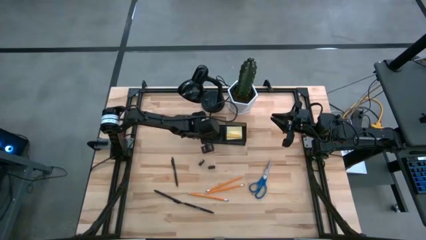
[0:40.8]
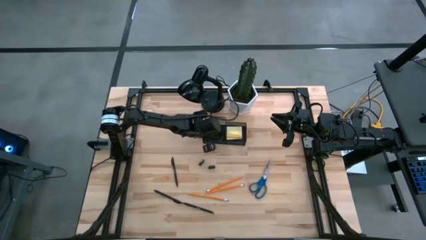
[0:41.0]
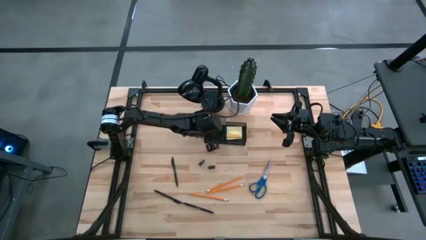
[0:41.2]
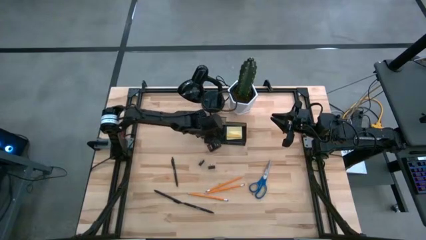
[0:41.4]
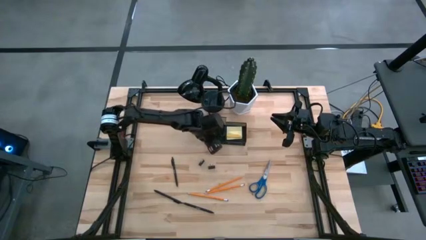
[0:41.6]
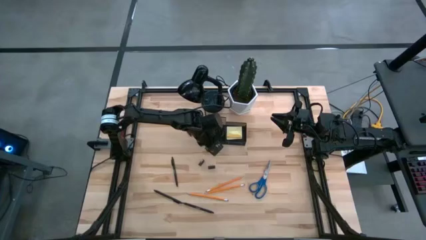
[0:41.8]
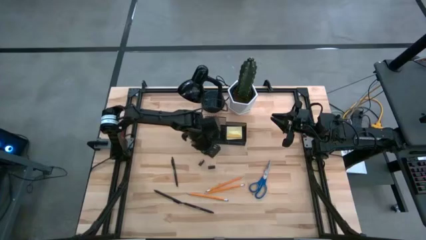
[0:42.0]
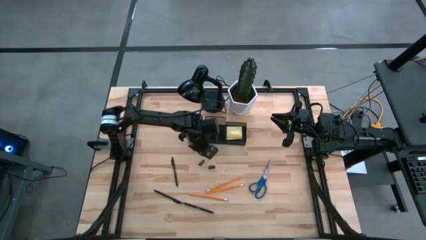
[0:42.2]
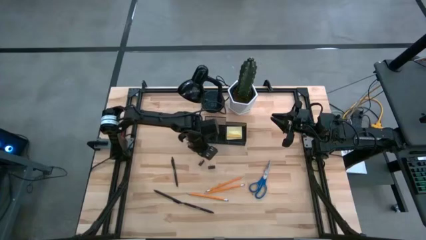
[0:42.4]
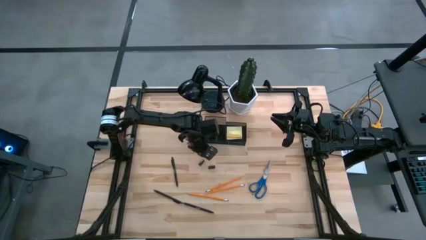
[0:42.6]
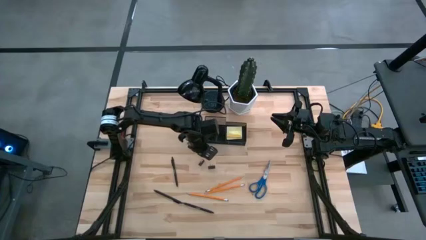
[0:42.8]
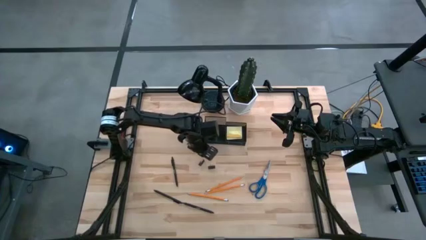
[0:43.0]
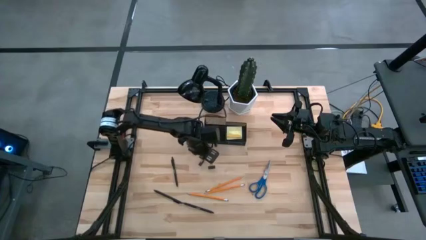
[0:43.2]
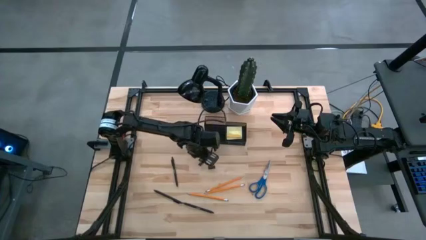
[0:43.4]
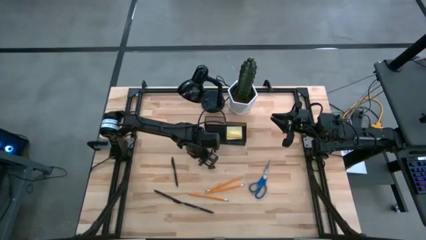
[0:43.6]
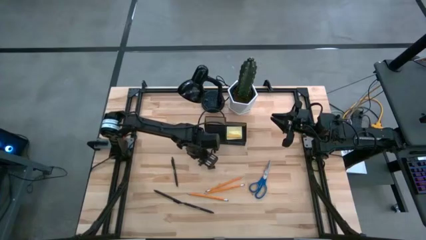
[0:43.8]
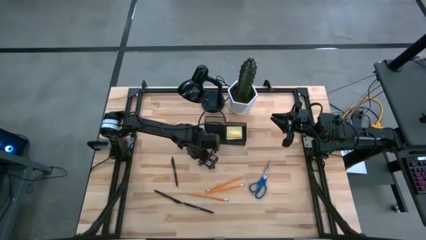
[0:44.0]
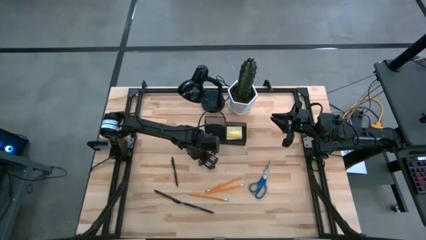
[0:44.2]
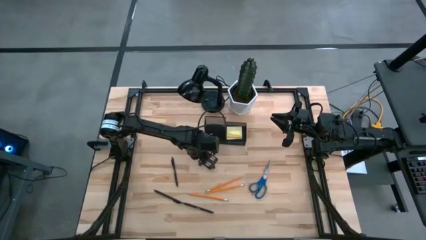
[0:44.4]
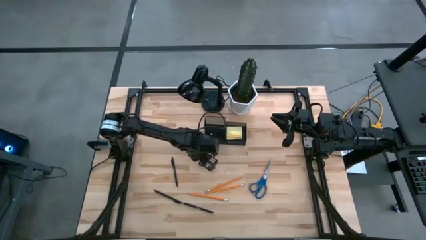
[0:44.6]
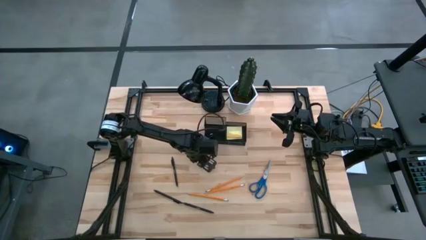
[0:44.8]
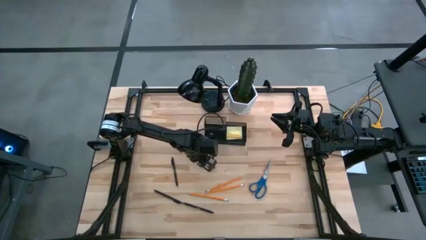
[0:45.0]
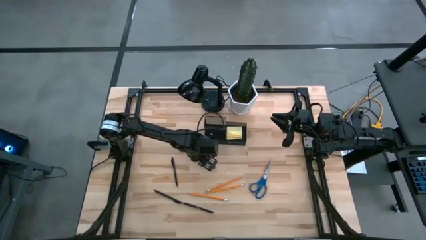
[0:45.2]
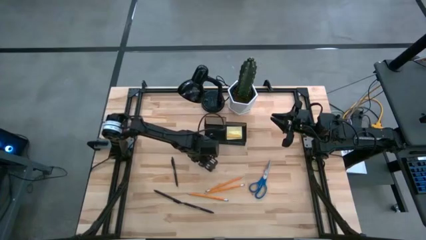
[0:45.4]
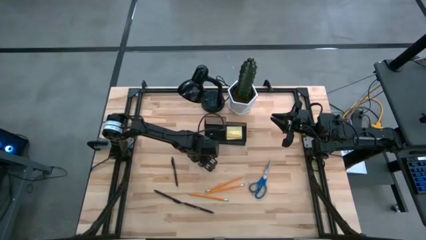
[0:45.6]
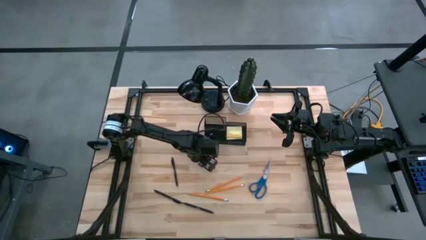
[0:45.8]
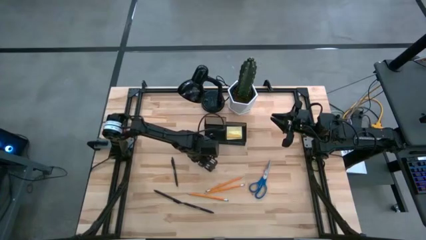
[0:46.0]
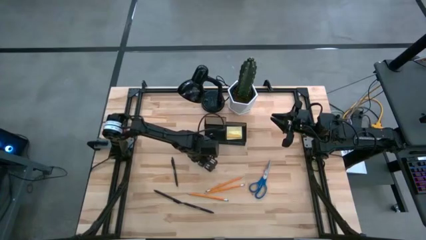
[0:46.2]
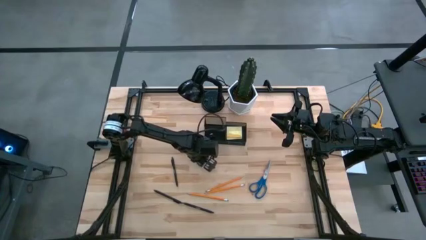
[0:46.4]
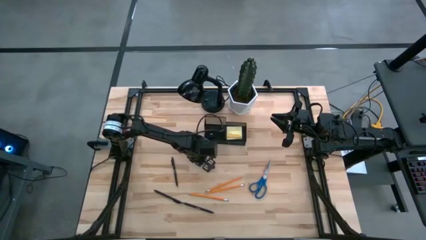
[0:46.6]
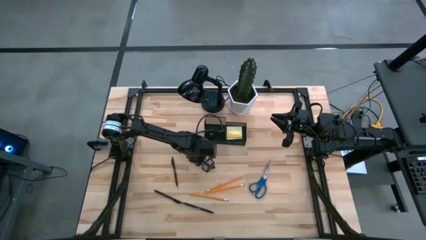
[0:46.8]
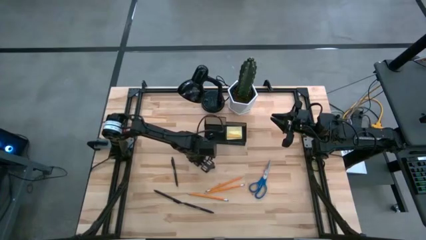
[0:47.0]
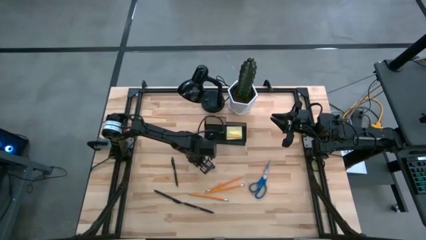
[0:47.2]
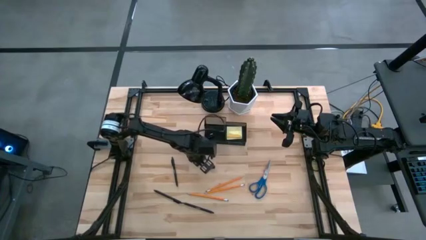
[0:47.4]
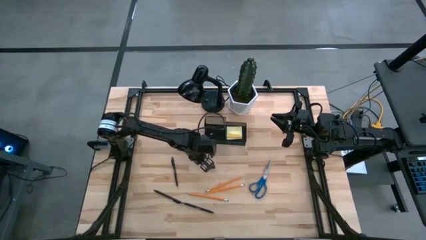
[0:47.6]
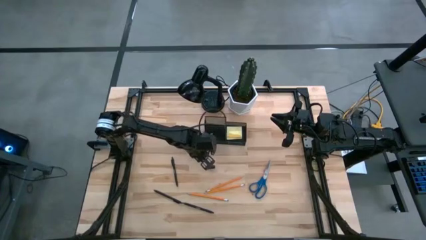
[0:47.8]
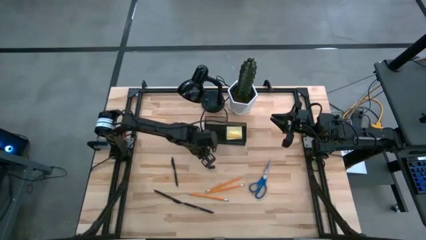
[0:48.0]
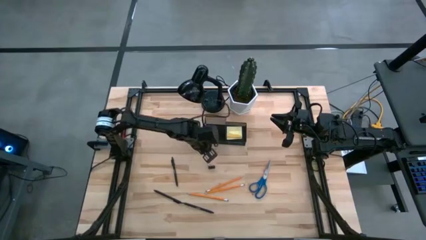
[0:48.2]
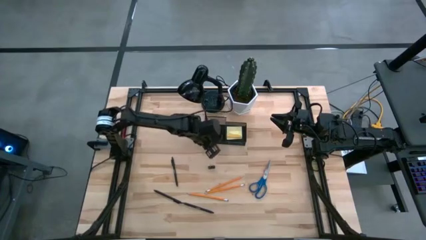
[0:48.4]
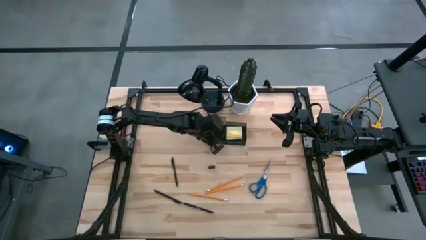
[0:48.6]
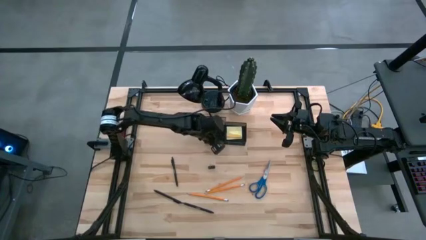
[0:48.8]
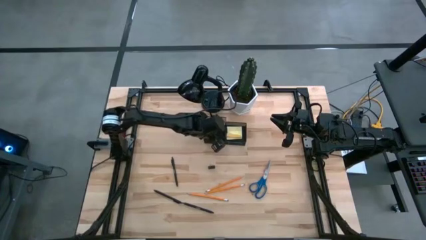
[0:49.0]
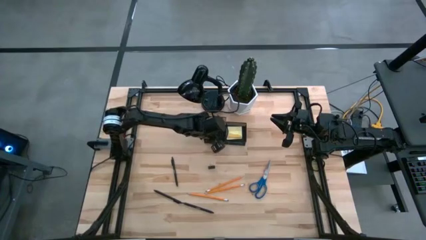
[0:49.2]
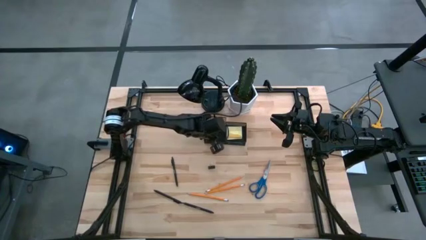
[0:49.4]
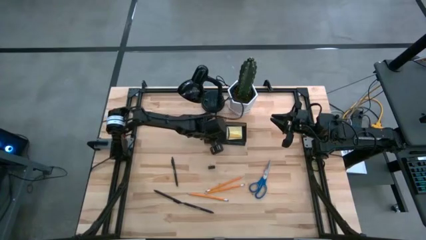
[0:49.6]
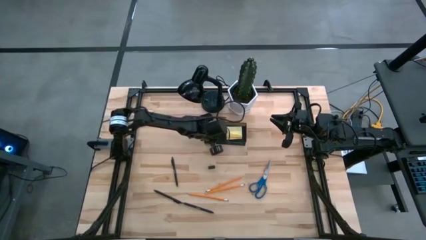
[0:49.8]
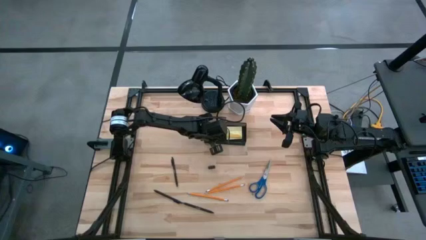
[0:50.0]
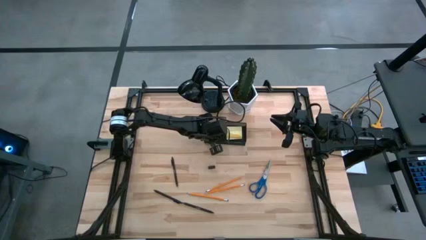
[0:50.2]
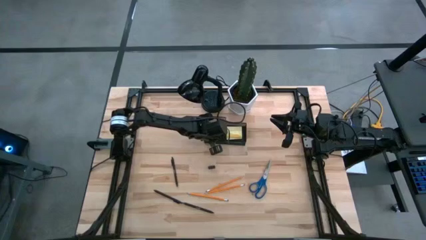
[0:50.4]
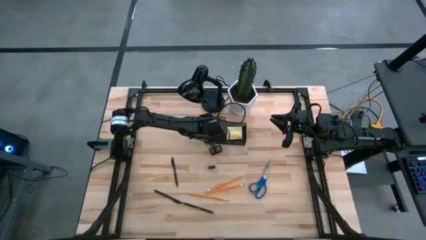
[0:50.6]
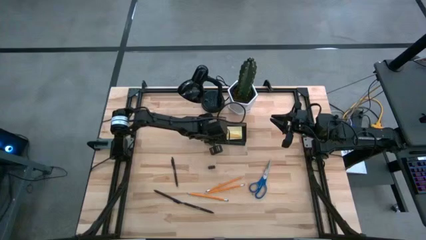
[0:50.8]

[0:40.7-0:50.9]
Task: Pick and place office supplies into organizer
Put the left black binder paper clip into the black desk organizer

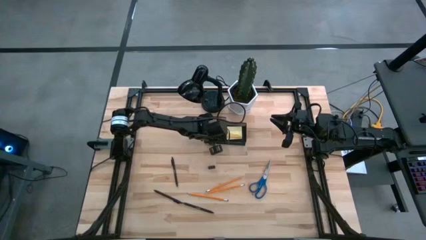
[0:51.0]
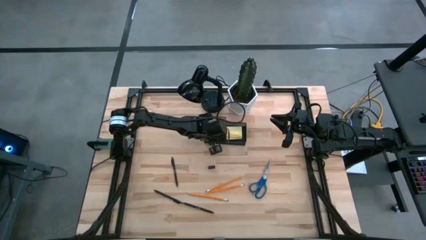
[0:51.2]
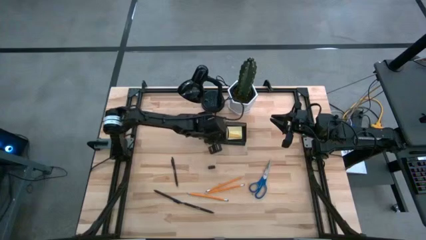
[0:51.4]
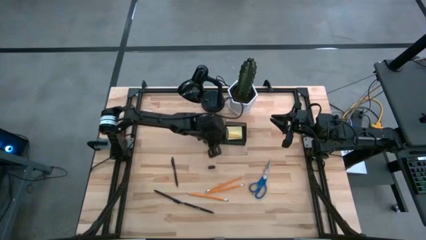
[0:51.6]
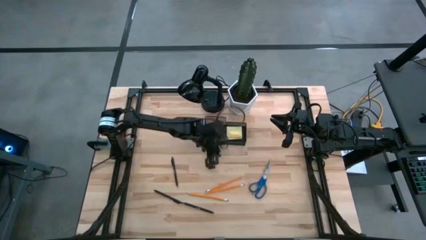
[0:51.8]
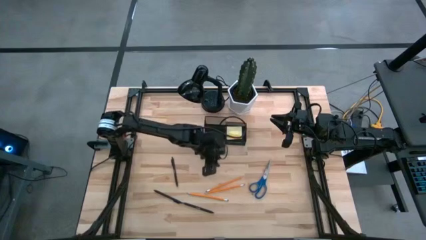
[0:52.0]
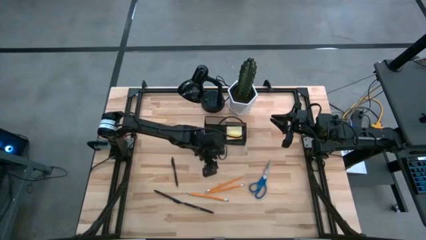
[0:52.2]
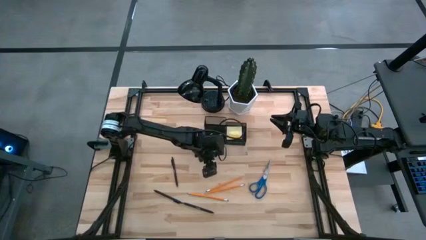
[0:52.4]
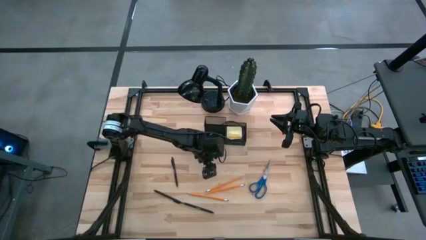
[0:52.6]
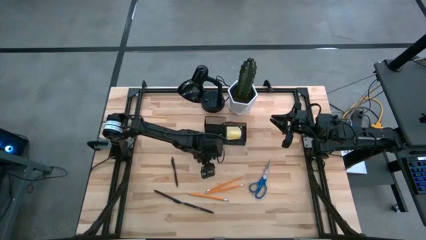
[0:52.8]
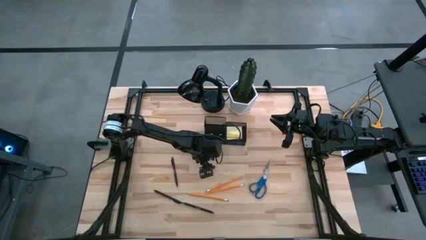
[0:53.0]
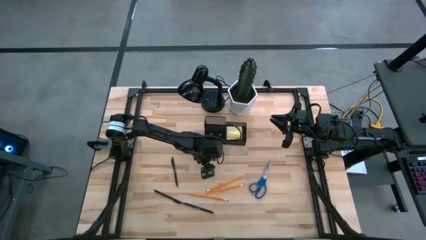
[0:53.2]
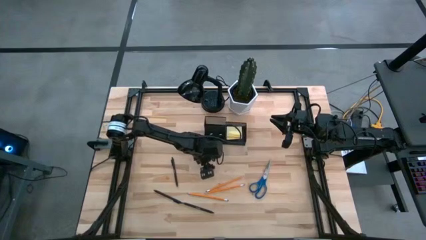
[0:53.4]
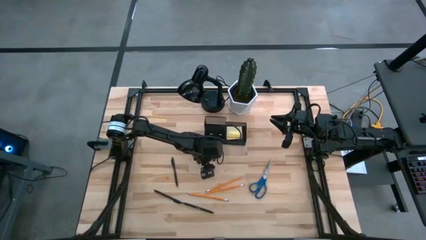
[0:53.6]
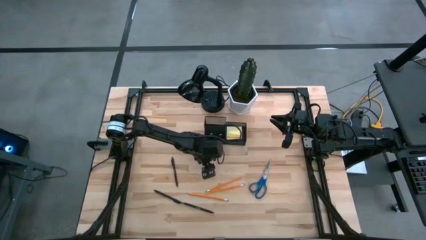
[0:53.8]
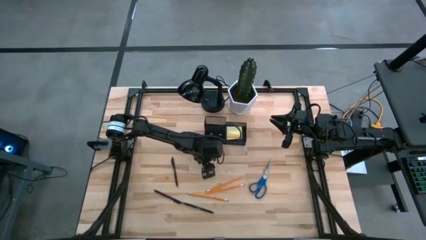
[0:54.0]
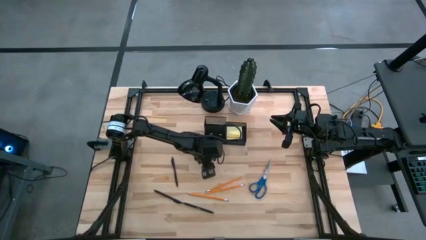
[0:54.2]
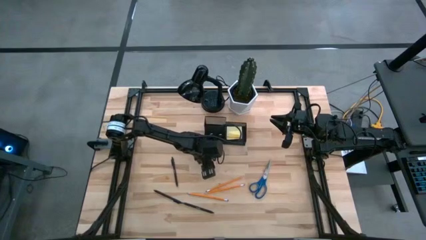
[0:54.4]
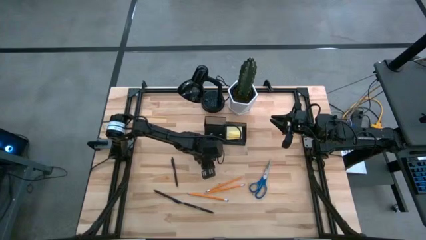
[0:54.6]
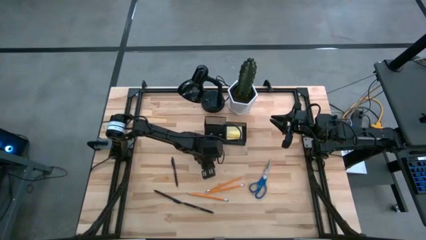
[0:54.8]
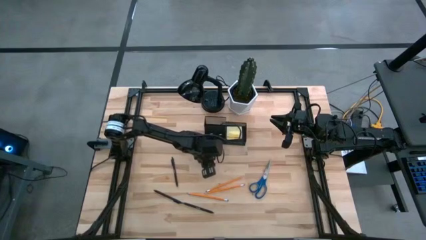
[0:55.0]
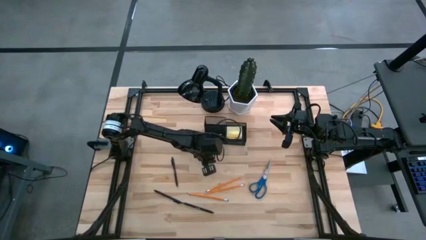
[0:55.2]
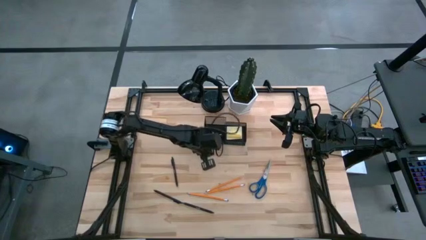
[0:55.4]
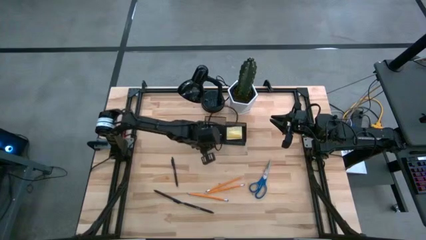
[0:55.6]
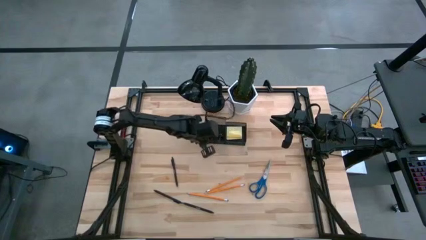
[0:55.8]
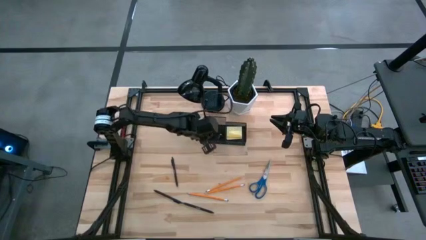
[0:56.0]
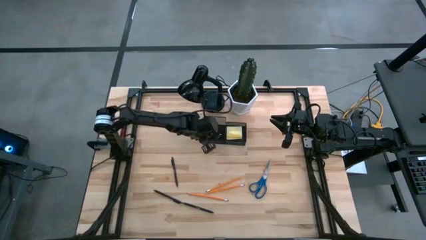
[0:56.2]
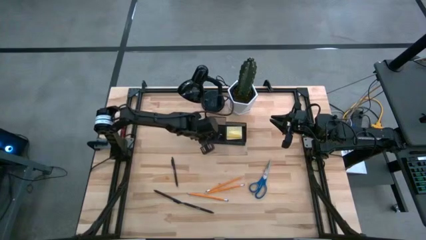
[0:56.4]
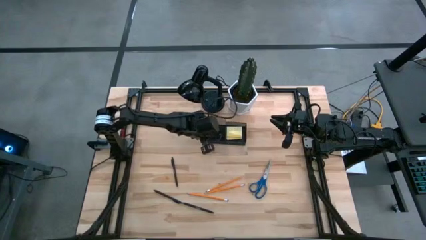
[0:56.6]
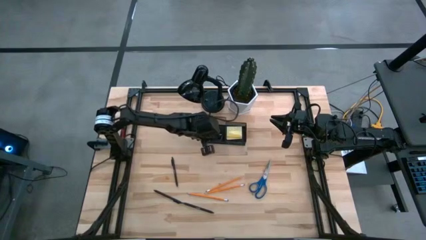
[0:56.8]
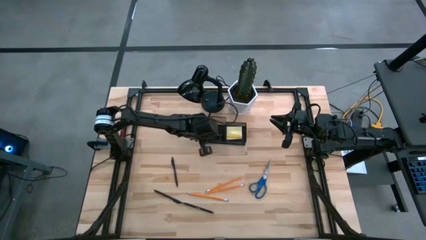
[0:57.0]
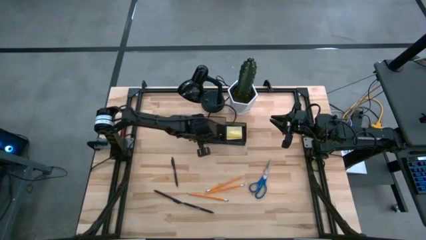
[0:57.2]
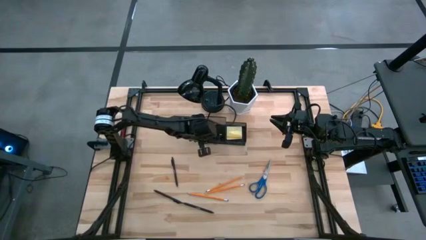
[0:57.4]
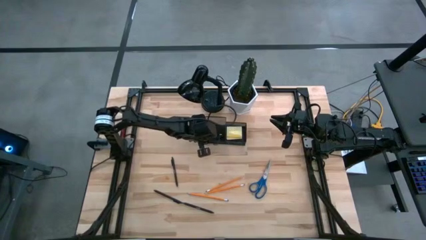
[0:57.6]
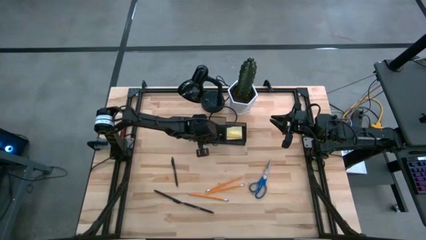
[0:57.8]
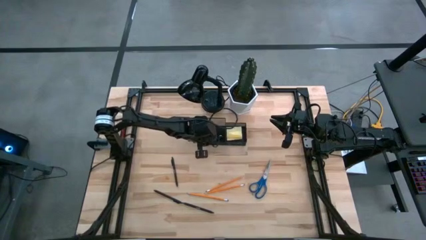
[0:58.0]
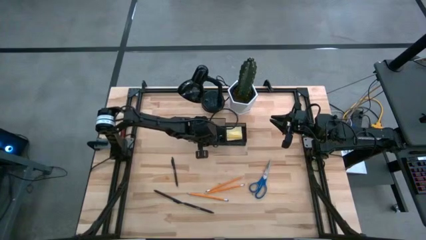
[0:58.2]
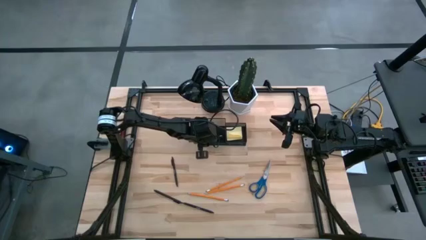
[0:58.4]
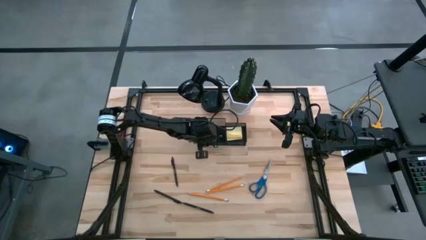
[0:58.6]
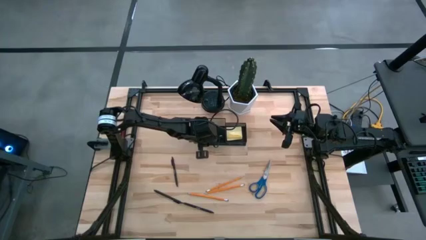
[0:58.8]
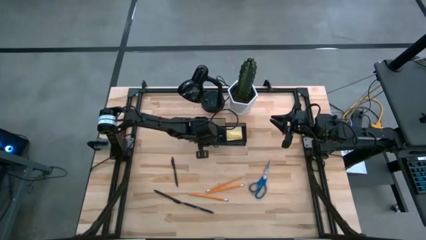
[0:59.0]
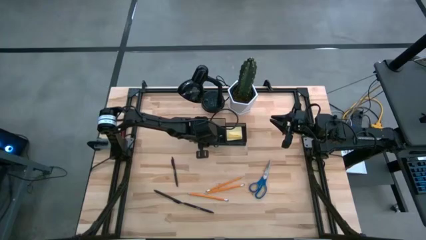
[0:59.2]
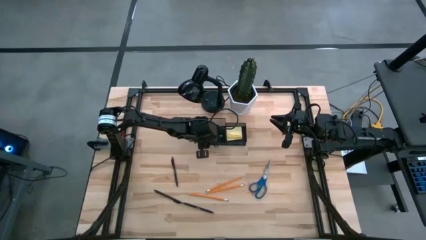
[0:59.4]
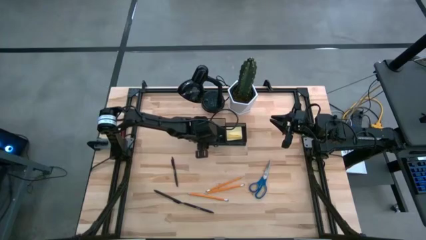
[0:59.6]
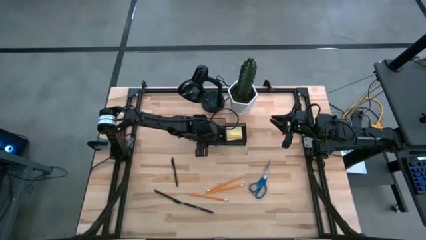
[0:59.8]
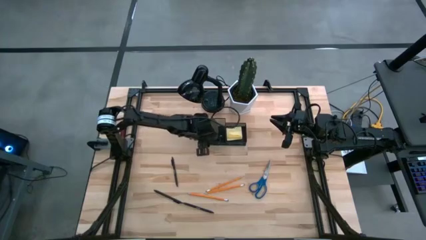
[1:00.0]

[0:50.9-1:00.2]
Put the black binder paper clip into the black desk organizer
